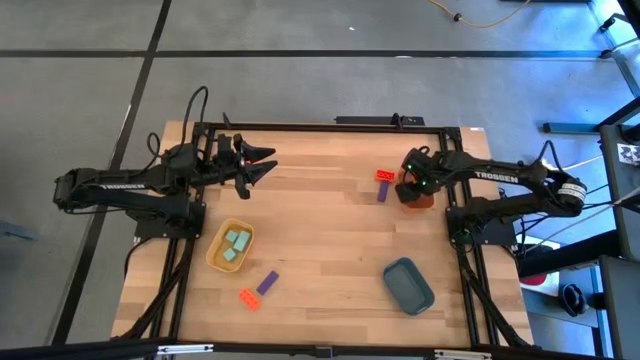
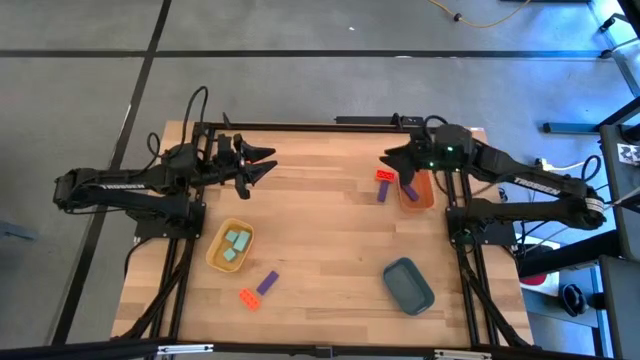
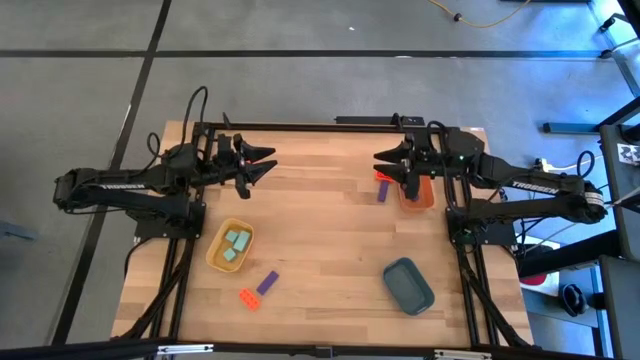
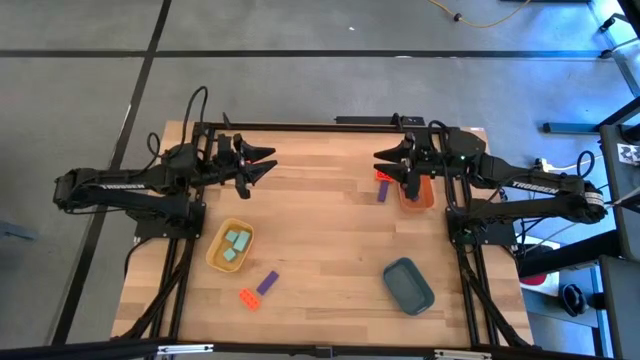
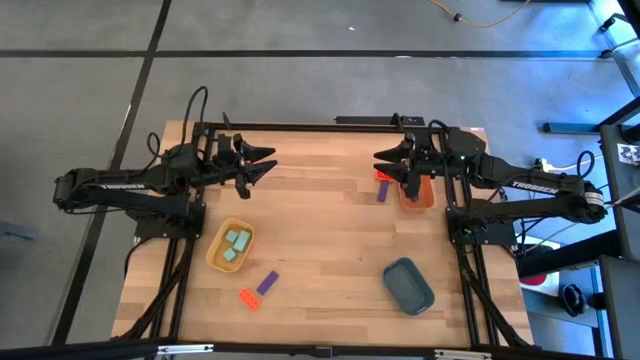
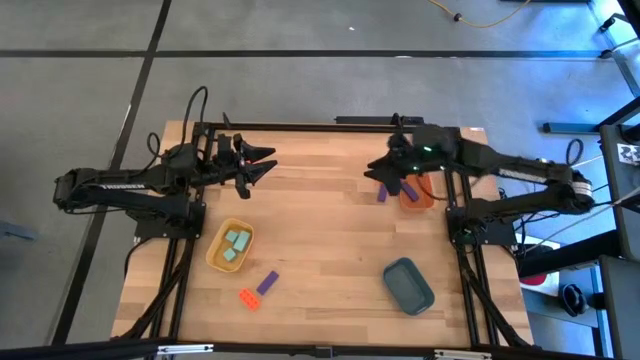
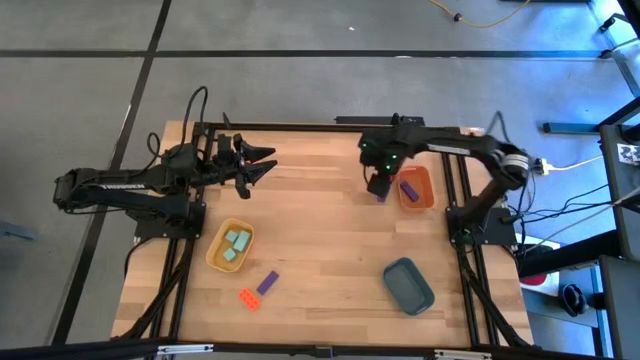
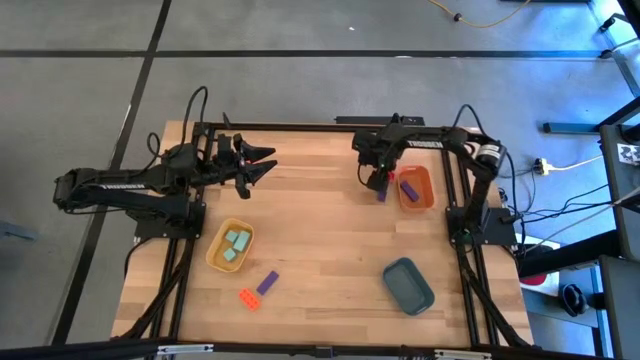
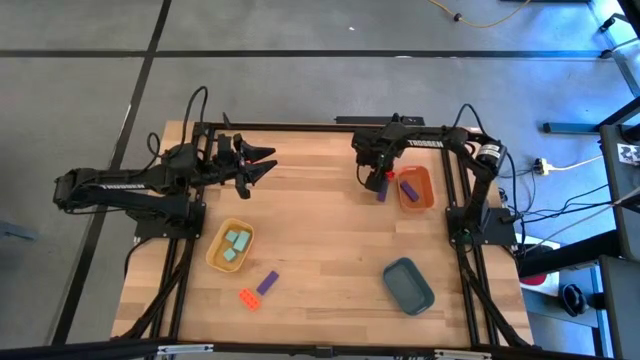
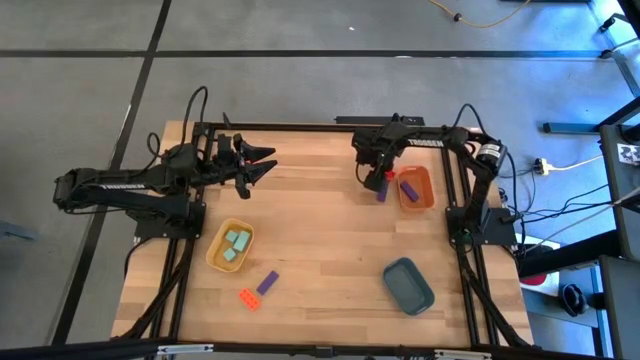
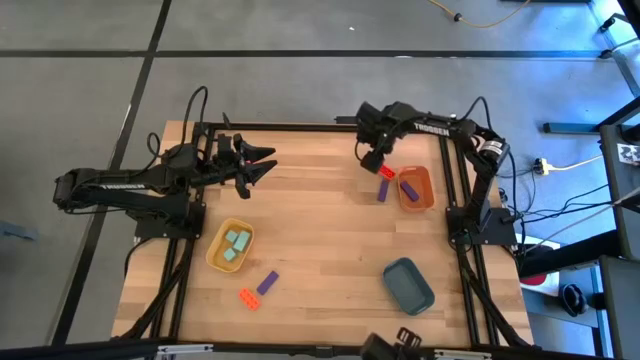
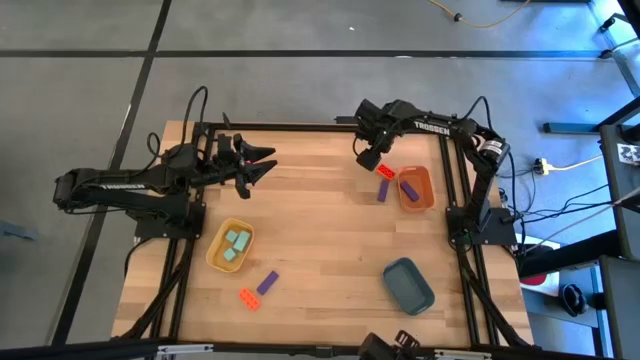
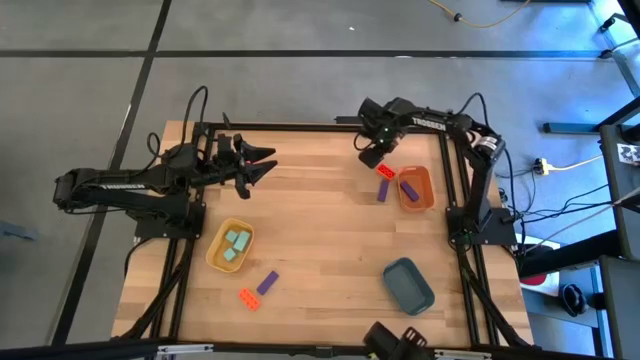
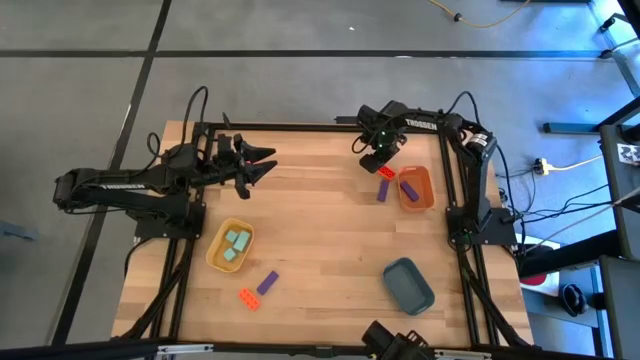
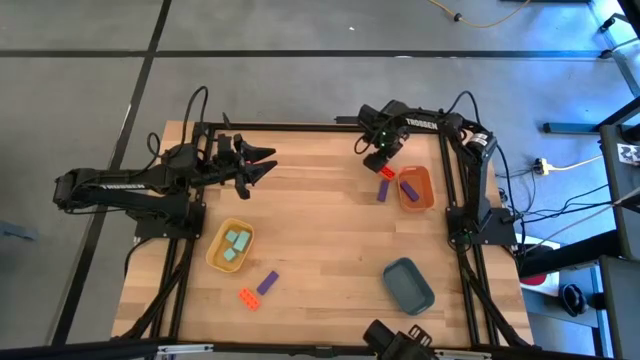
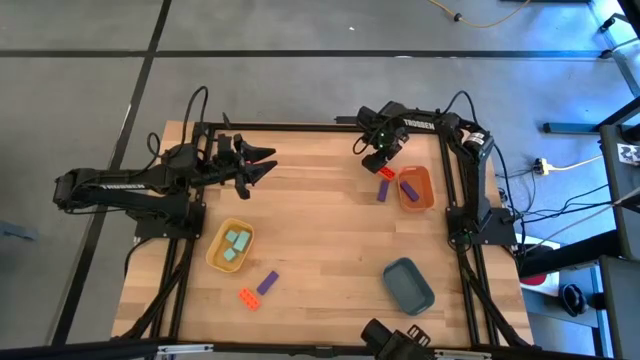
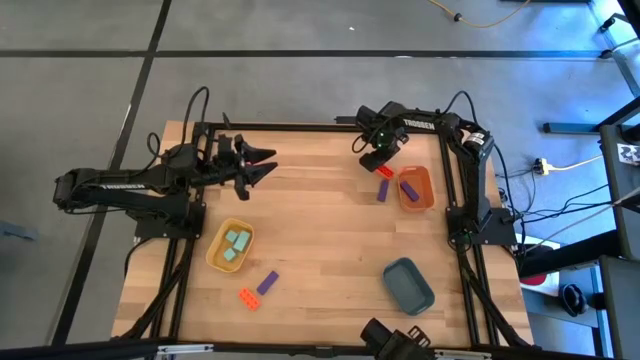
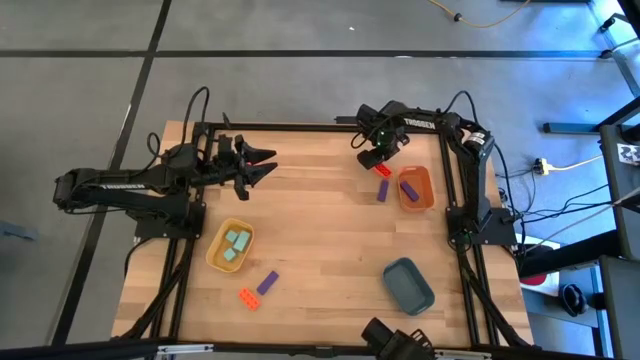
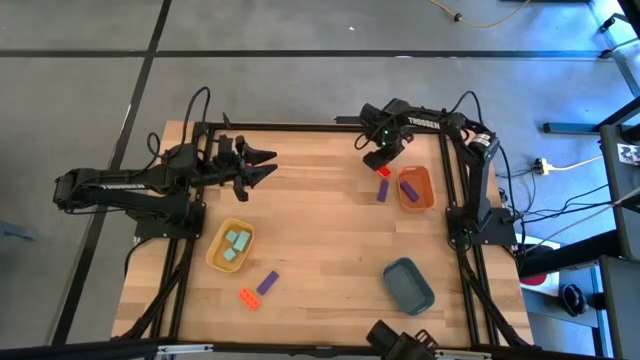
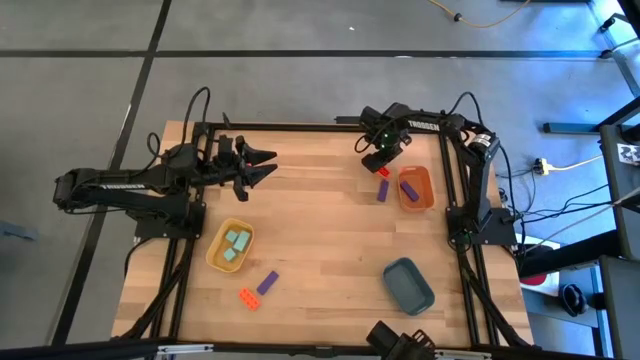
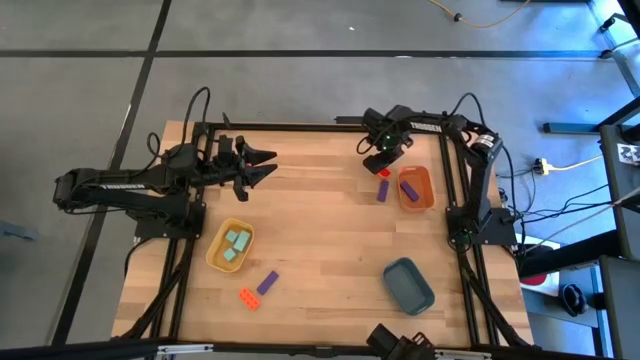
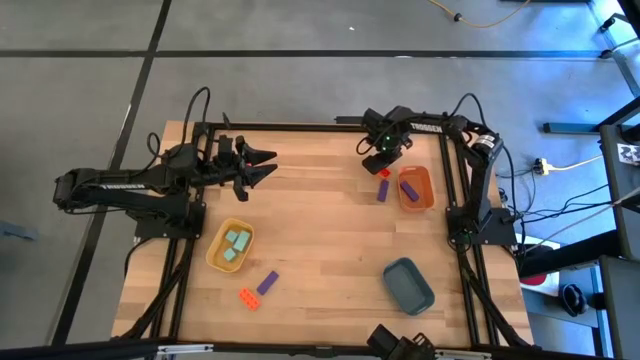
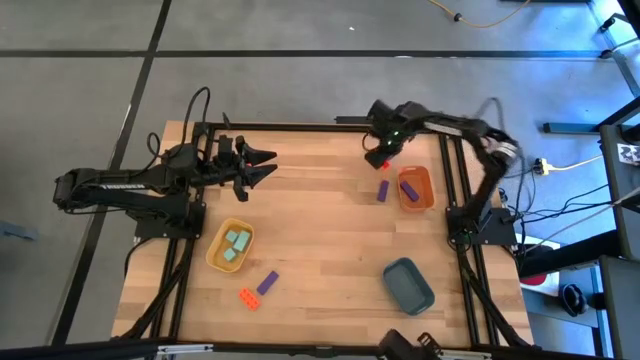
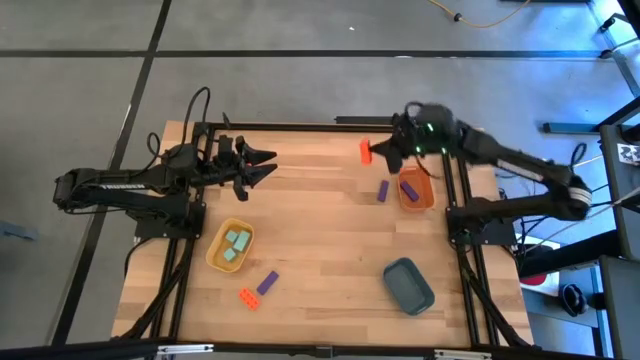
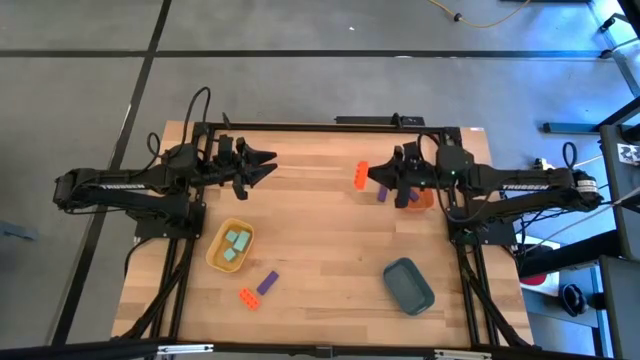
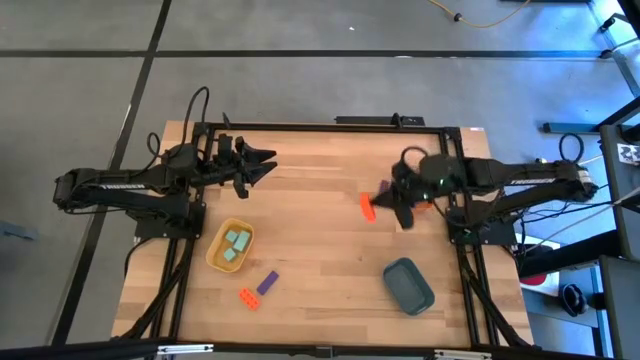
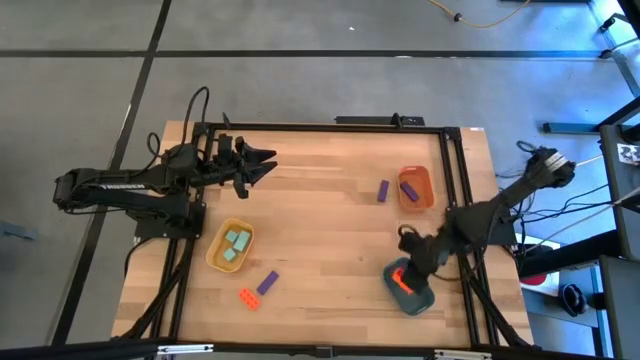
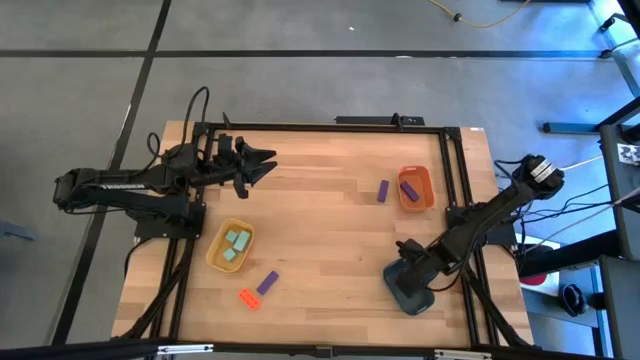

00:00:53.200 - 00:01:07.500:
Task: Sort & place blocks by color
Put the top right orange game piece into the blue bin

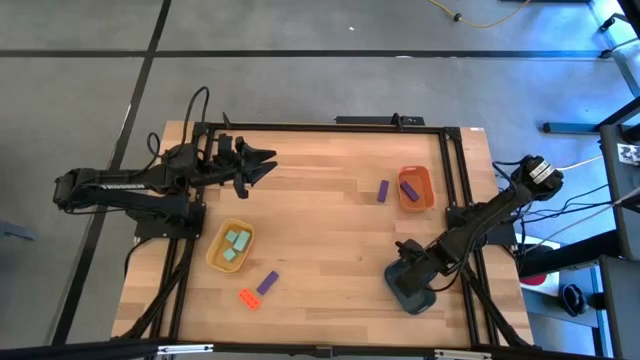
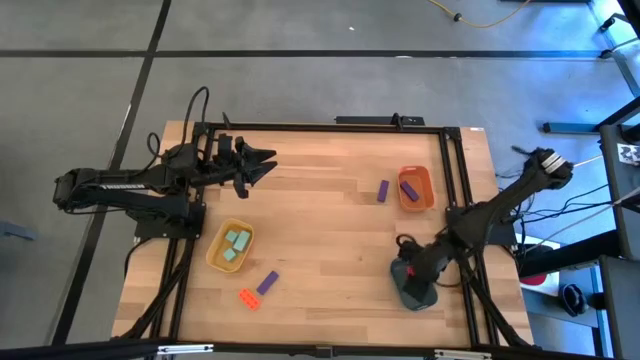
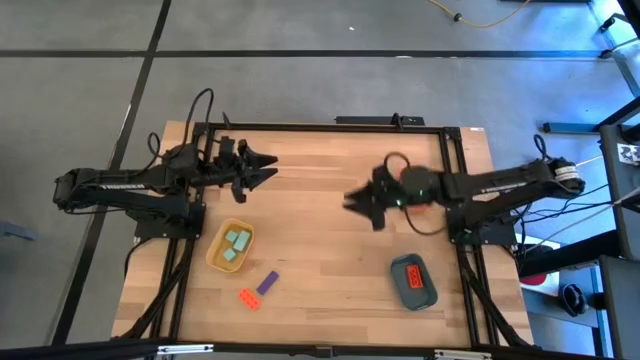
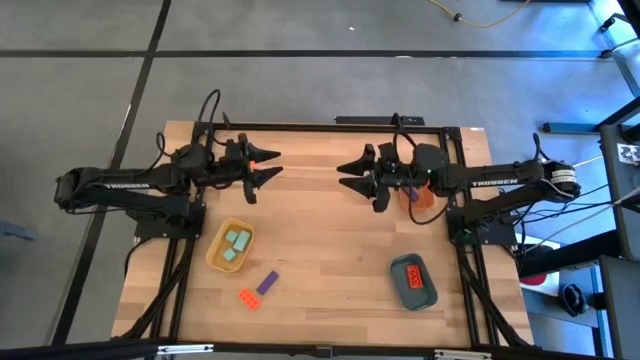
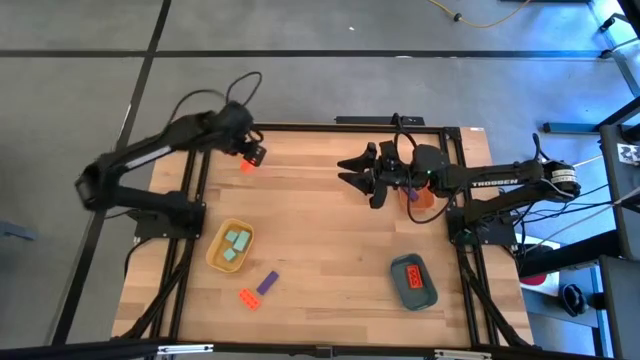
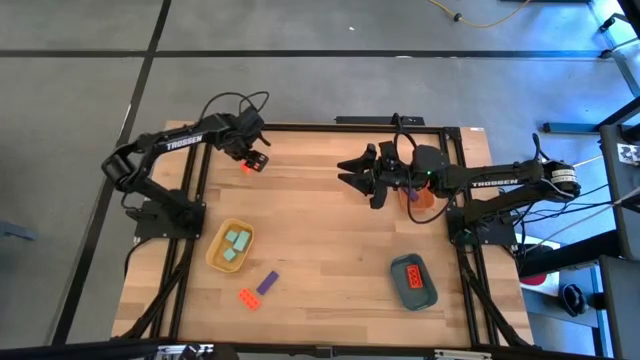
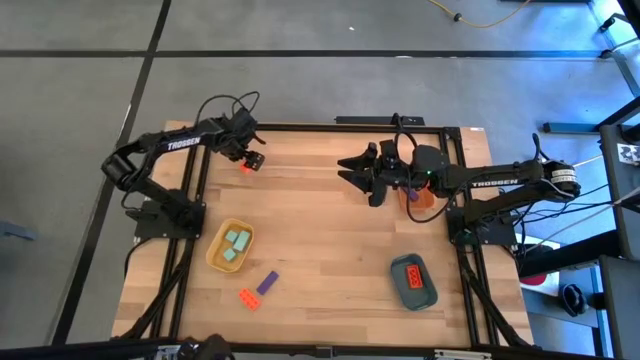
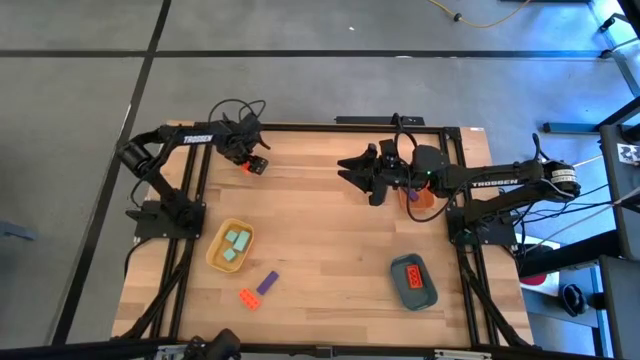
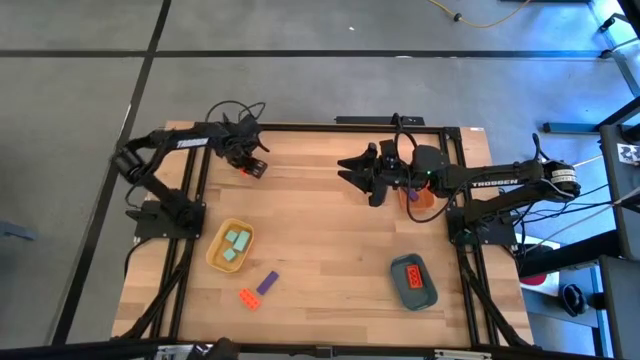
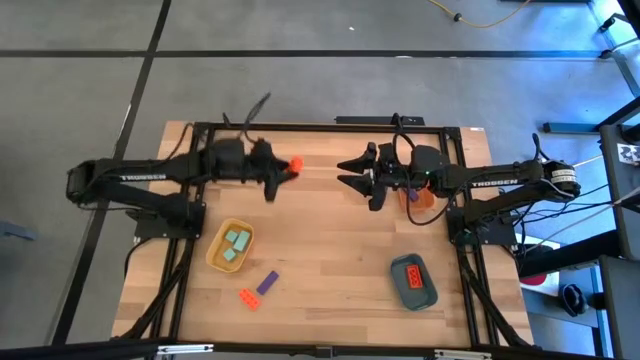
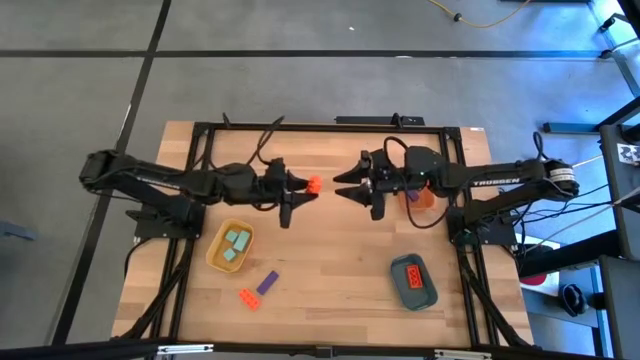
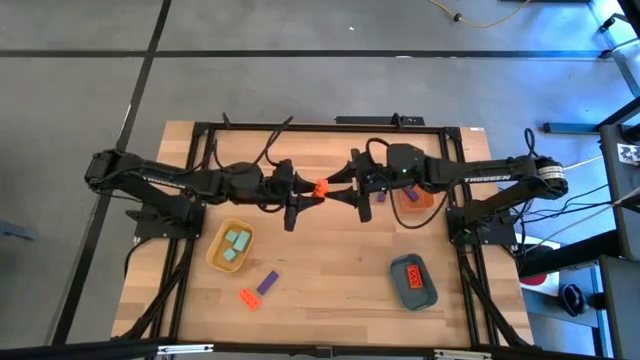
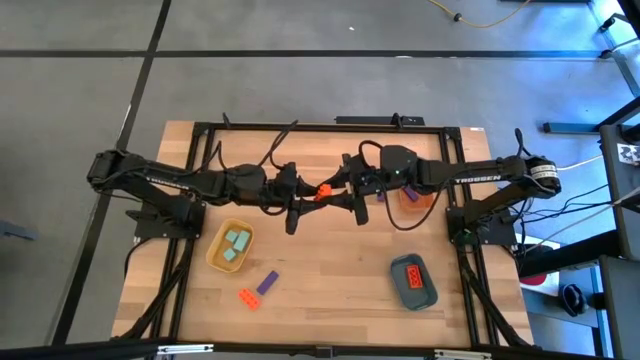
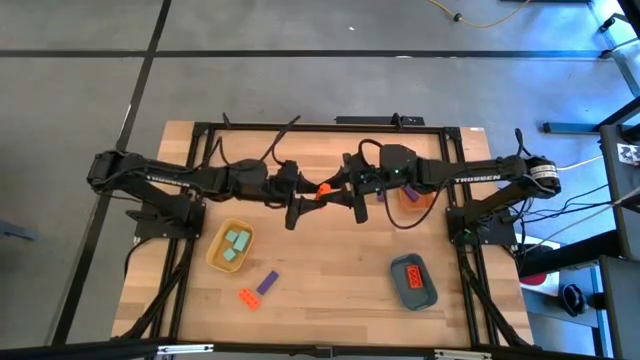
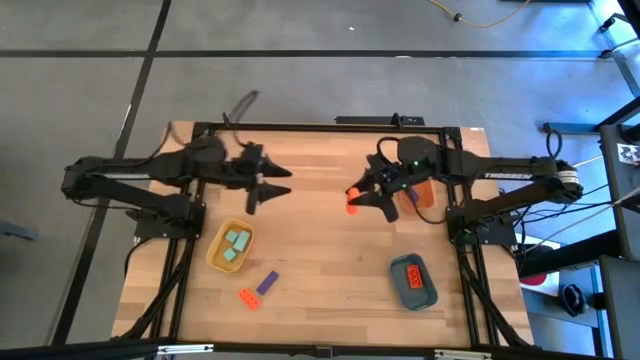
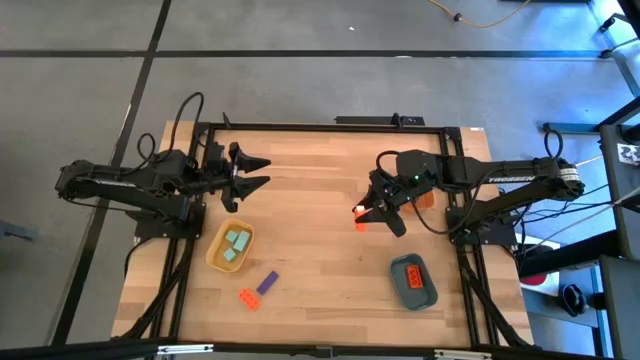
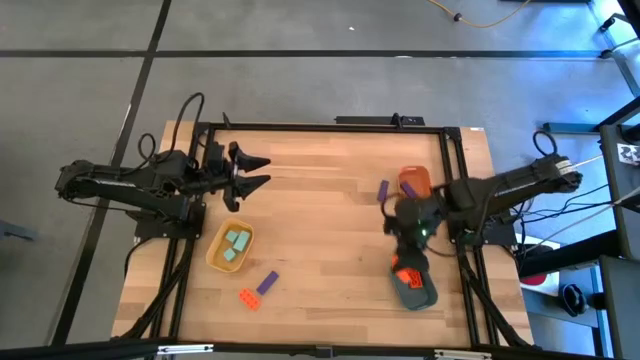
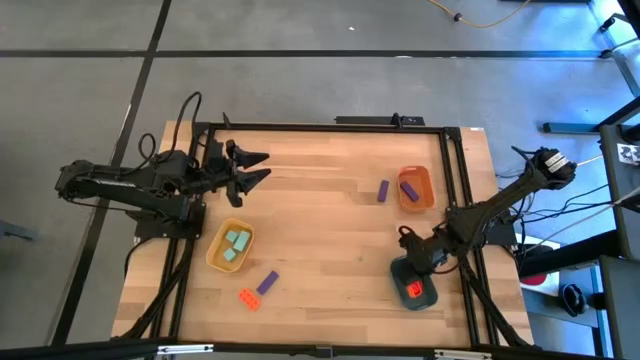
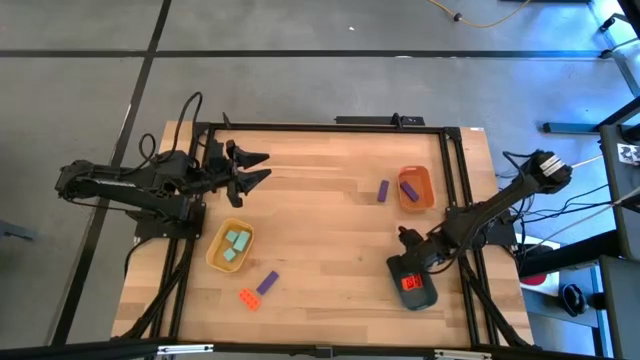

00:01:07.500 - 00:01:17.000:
Put the top orange game piece into the blue bin
